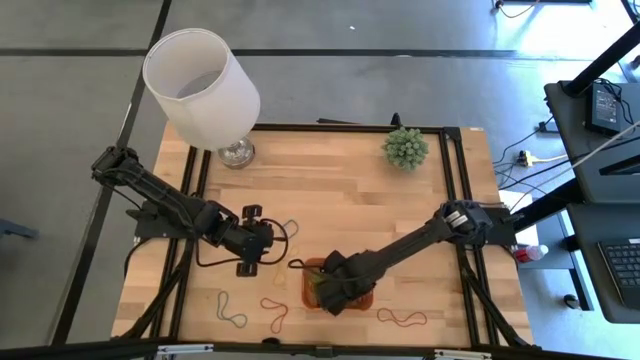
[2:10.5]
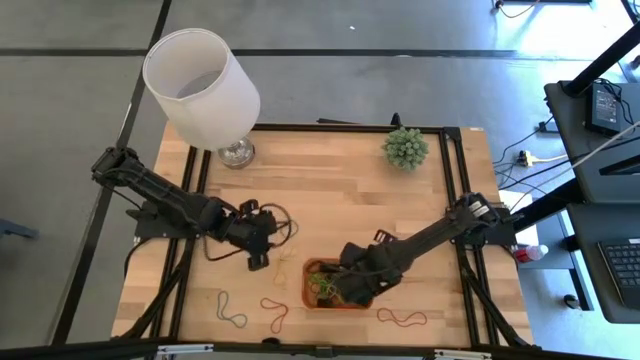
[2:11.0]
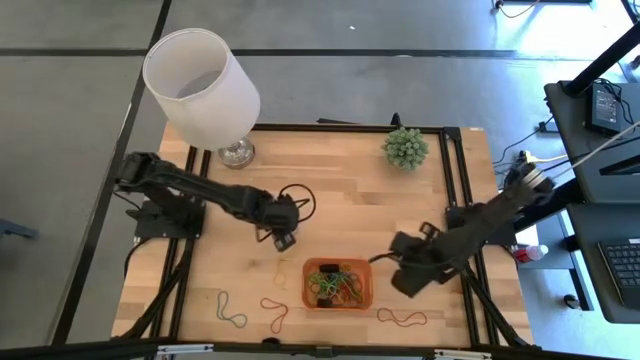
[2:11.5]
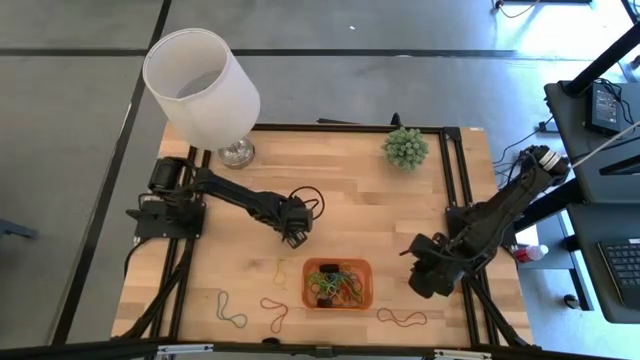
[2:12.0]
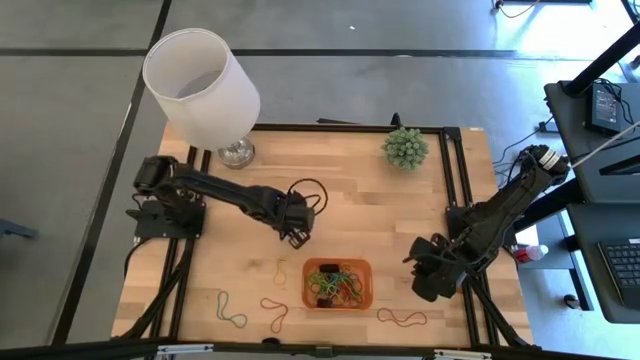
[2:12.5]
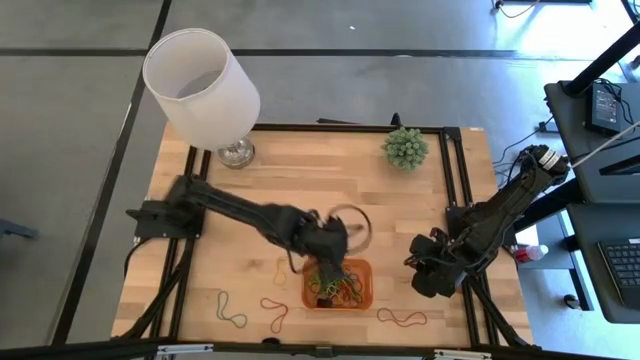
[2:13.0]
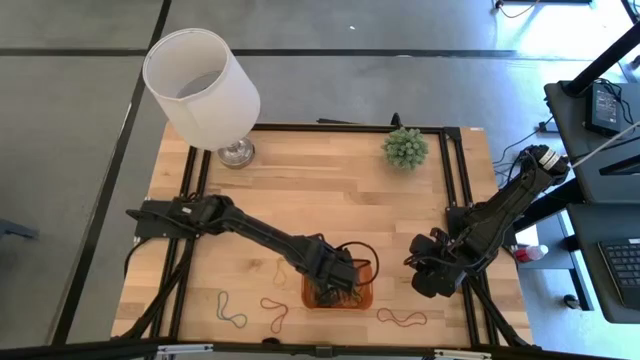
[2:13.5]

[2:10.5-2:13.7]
Task: Pick and place rubber bands into bin
Put the blue rubber band into the orange bin

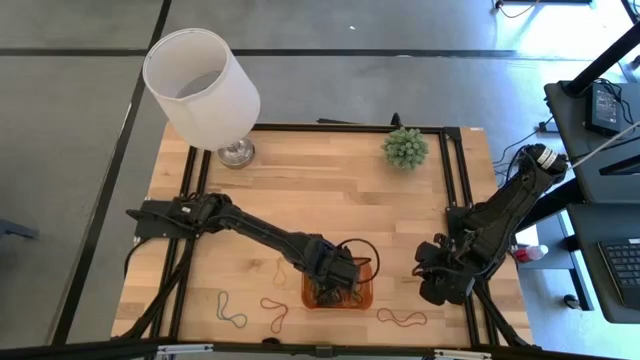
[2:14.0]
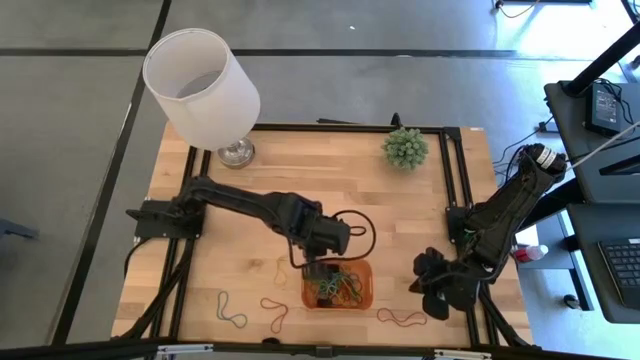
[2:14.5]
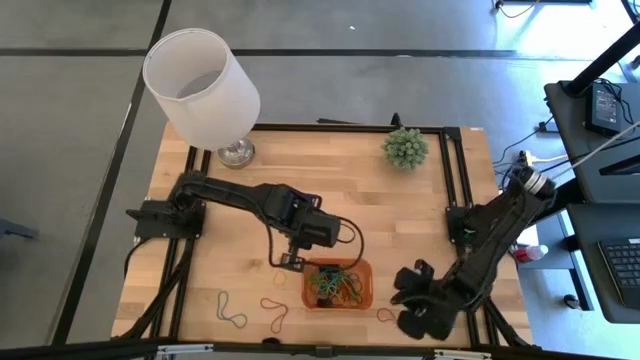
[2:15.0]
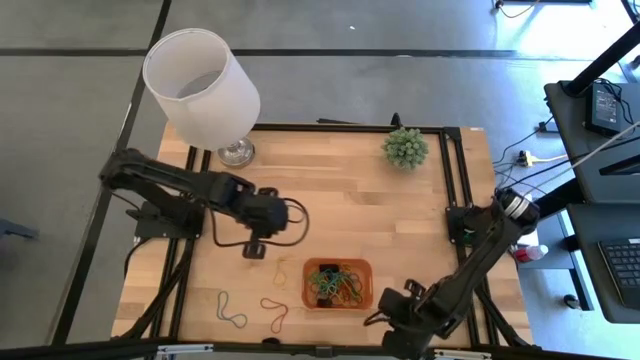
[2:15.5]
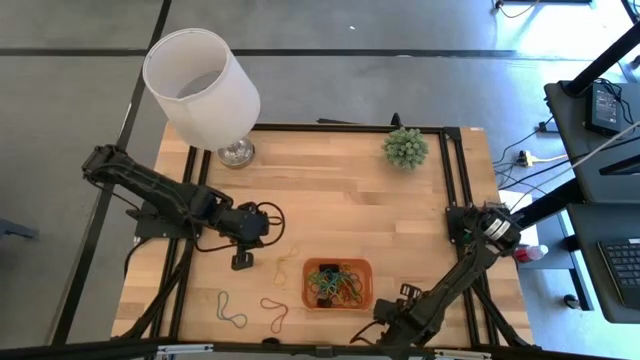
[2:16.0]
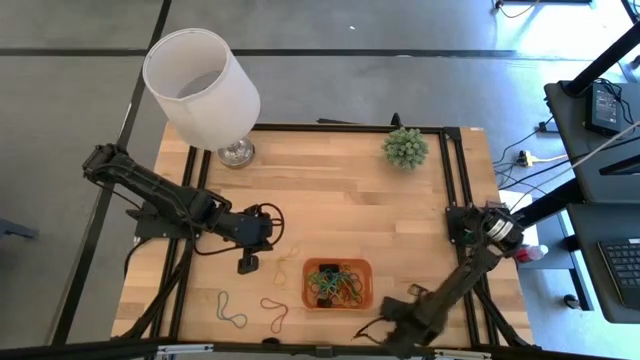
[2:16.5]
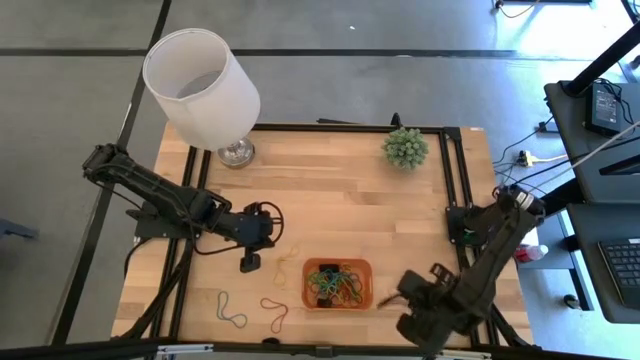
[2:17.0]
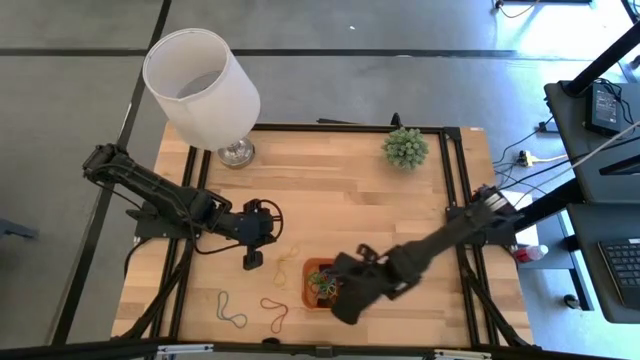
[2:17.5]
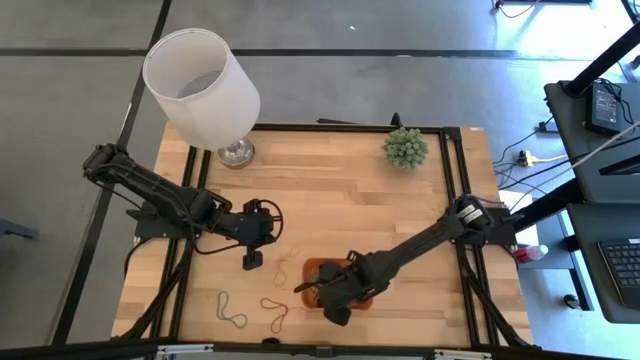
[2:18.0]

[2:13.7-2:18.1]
Put the orange rubber band into the orange bin

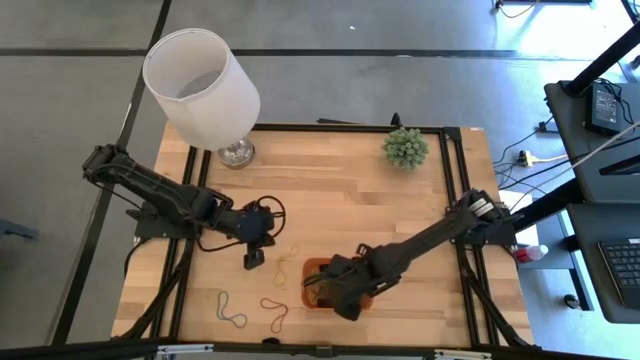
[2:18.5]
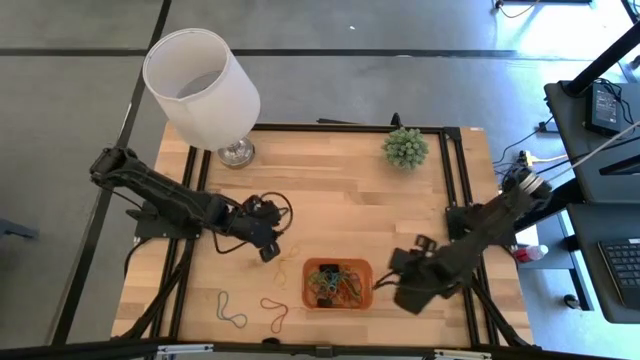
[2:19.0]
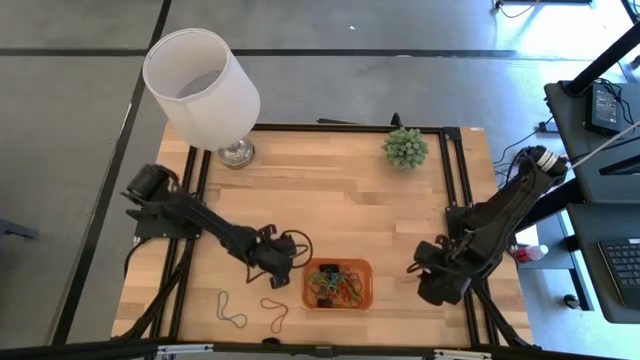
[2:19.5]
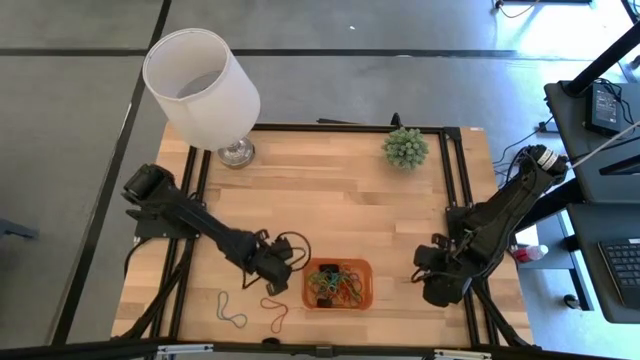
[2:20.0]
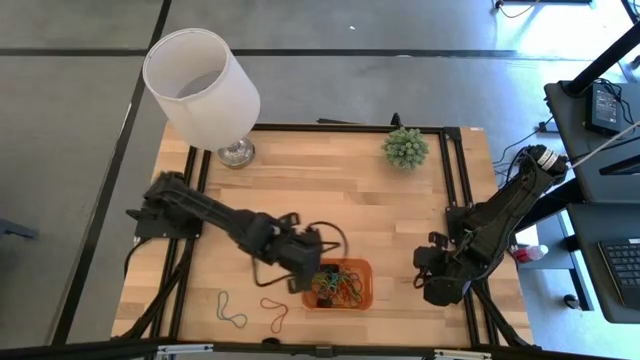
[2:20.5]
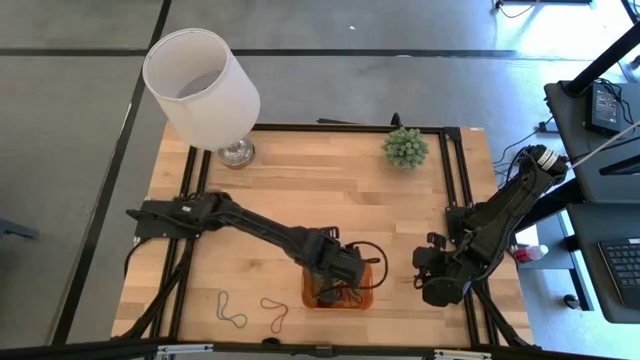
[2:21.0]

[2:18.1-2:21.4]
Put the yellow rubber band into the orange bin

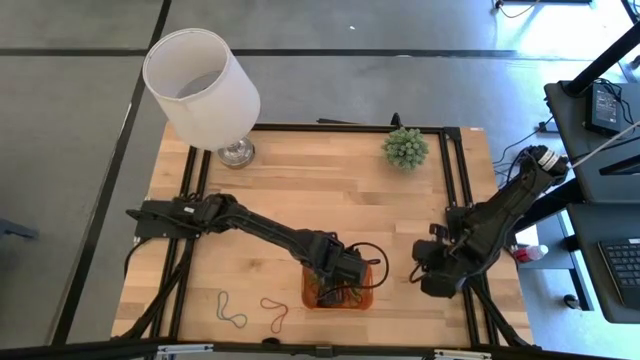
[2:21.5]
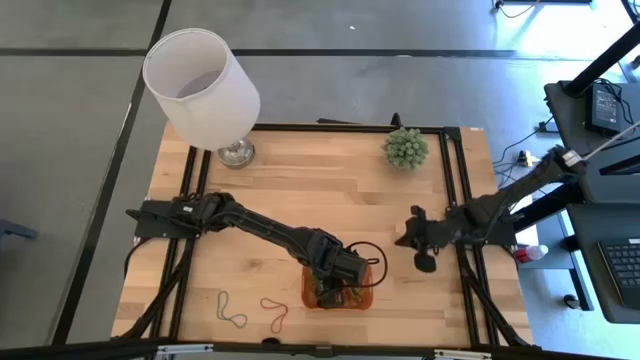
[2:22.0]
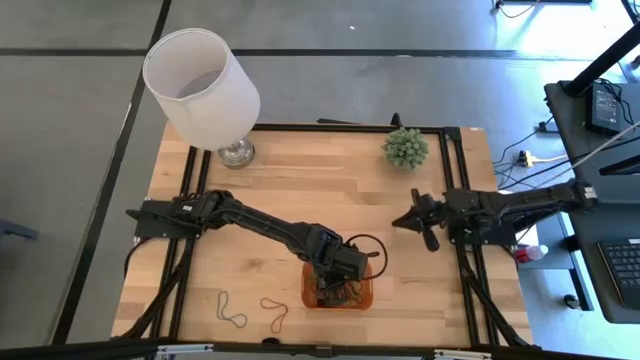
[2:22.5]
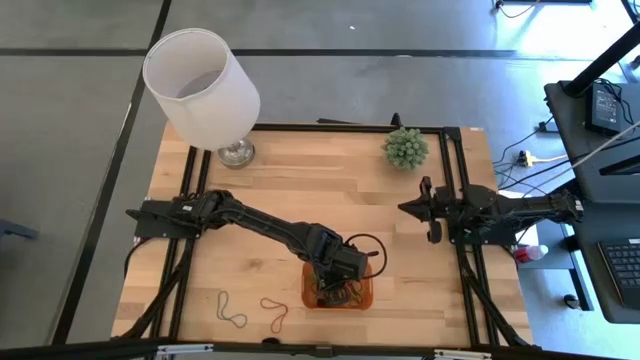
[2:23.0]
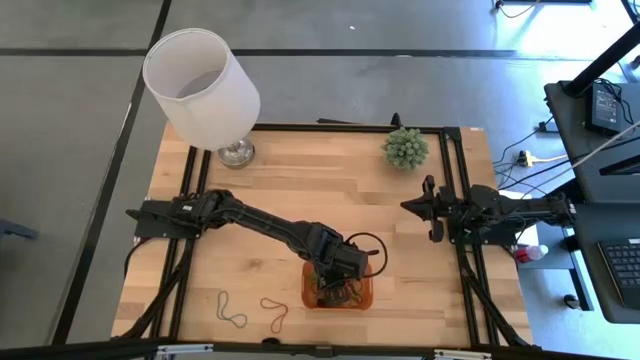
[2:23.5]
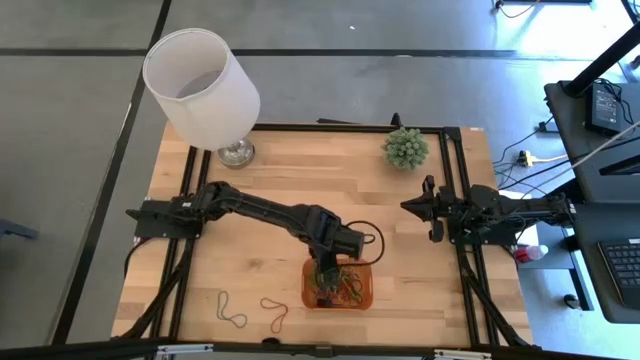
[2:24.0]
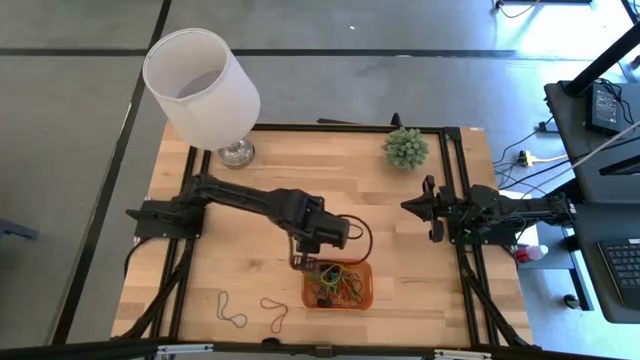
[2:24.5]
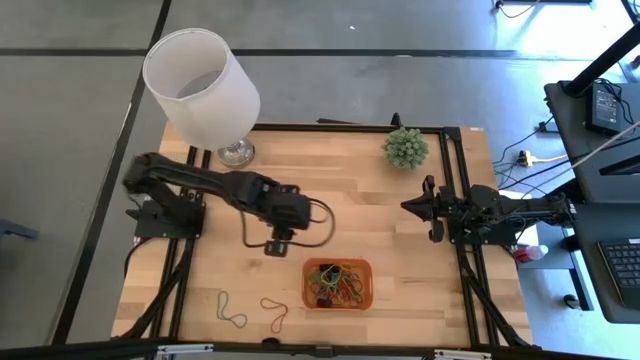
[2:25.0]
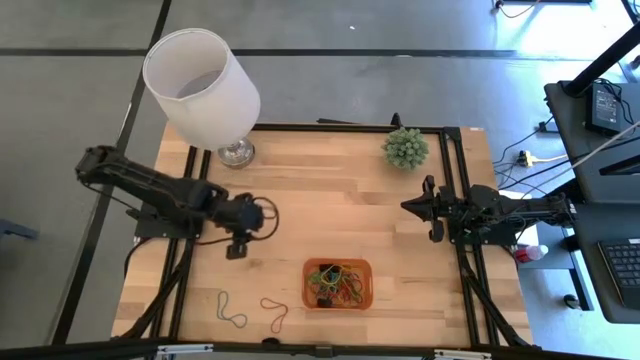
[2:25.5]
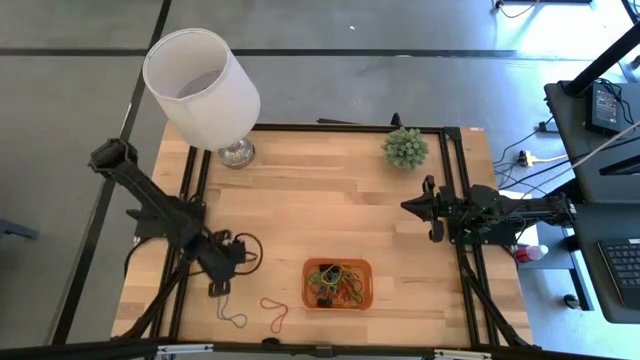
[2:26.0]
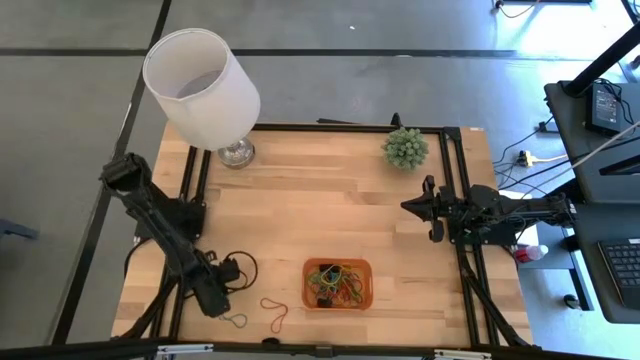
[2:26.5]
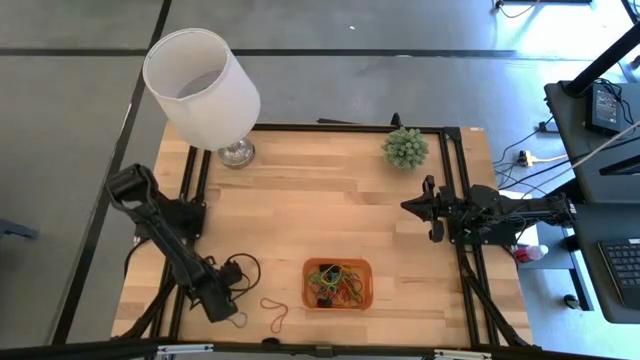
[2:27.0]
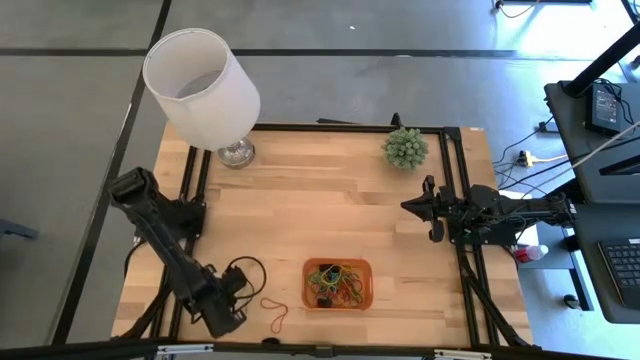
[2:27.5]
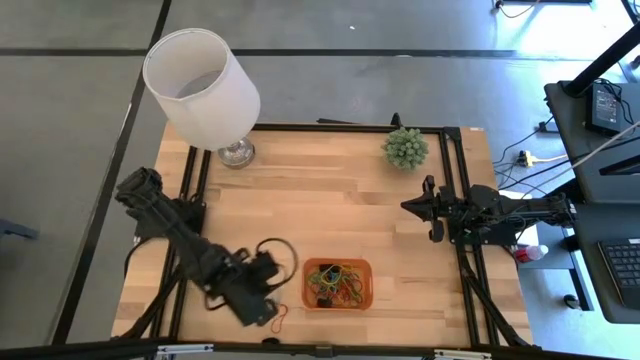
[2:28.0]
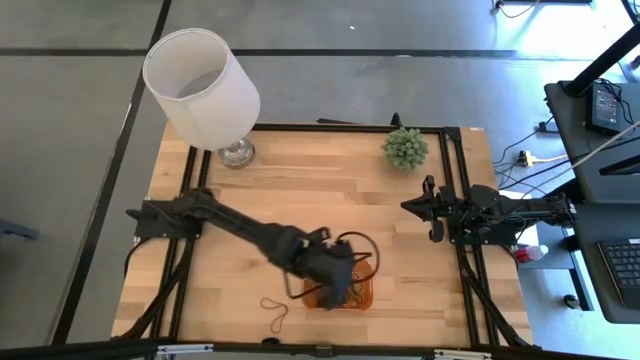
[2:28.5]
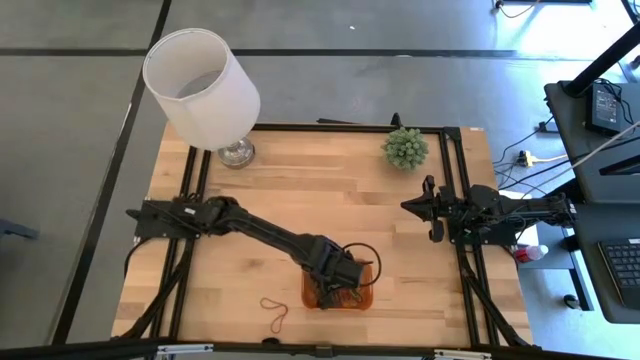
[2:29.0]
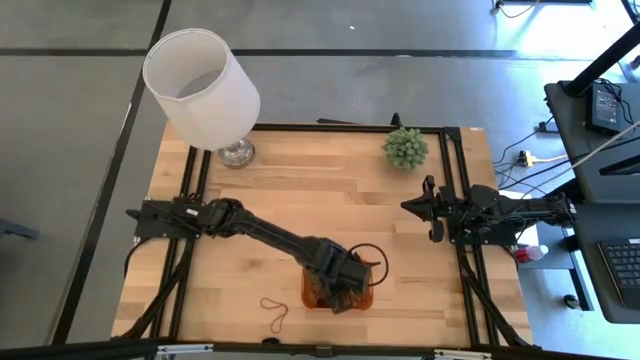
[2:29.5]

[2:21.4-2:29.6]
Put the blue rubber band into the orange bin

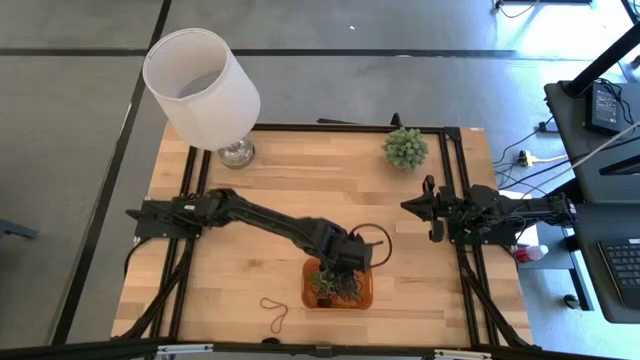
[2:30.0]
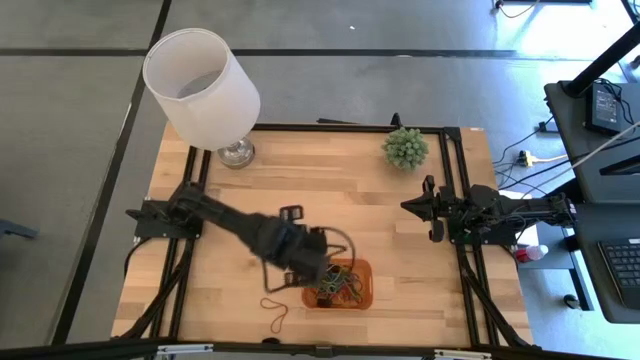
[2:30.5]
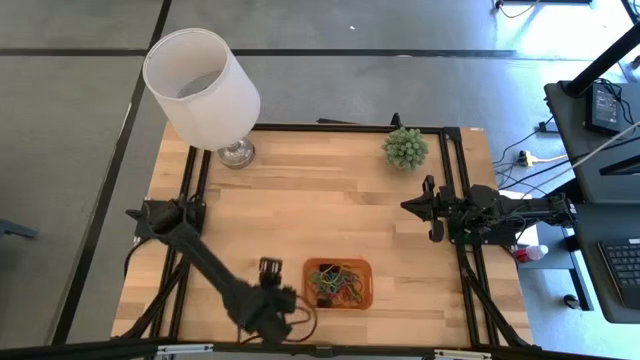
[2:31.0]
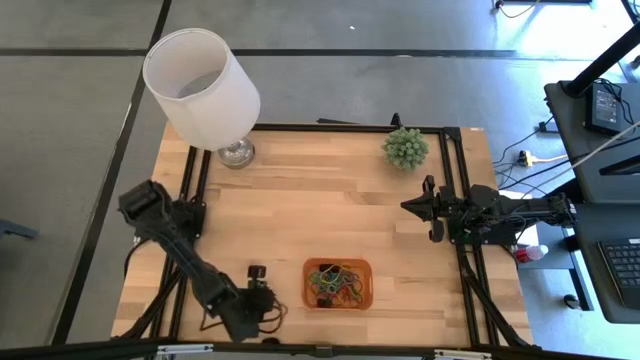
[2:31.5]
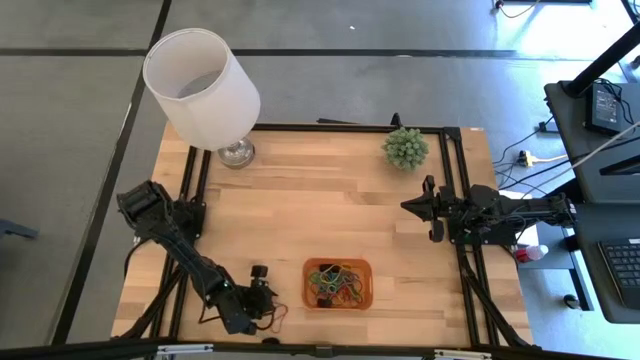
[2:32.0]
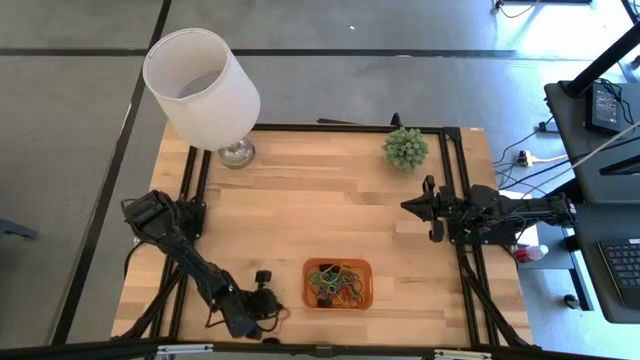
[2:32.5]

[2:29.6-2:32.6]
Put the red rubber band into the orange bin
